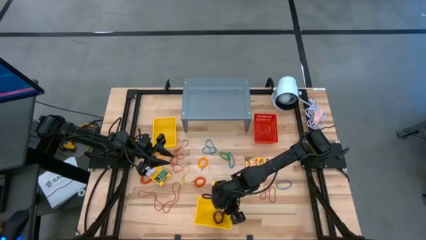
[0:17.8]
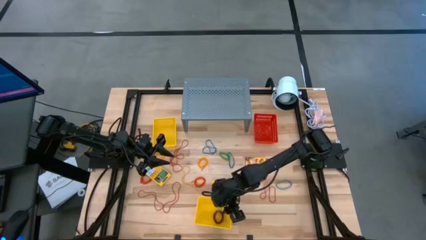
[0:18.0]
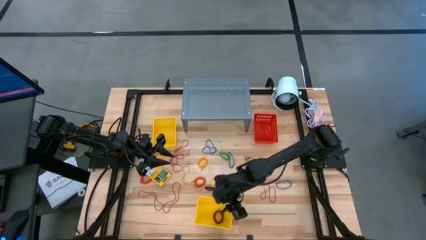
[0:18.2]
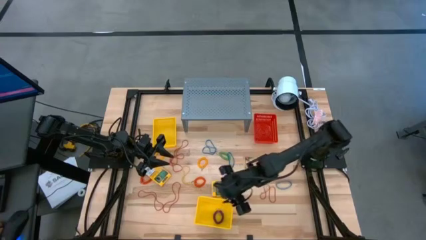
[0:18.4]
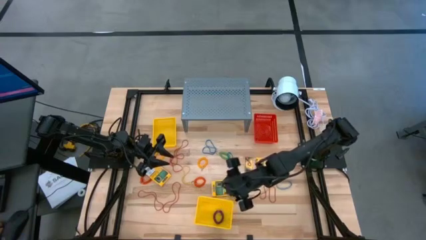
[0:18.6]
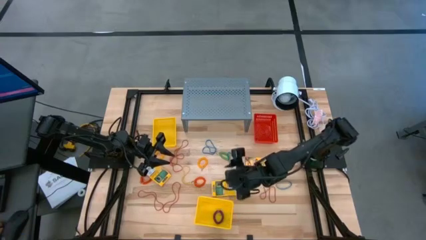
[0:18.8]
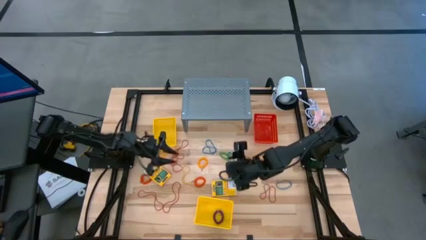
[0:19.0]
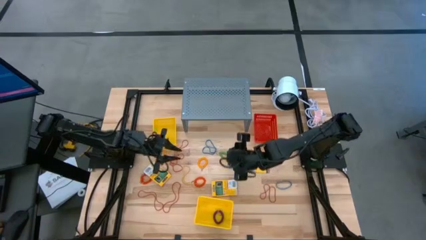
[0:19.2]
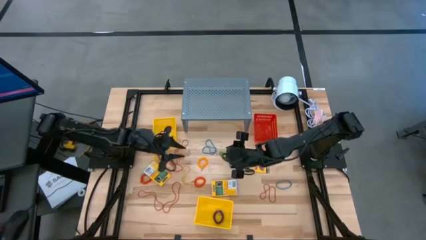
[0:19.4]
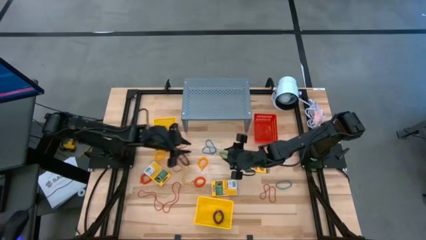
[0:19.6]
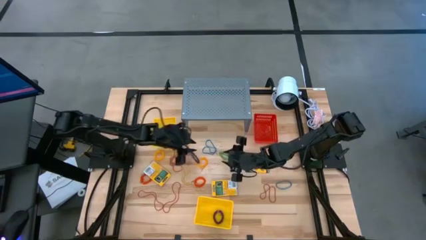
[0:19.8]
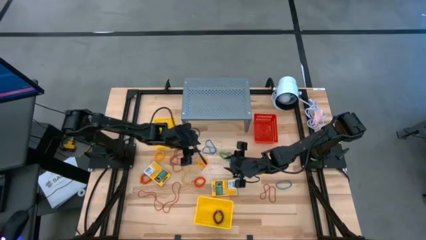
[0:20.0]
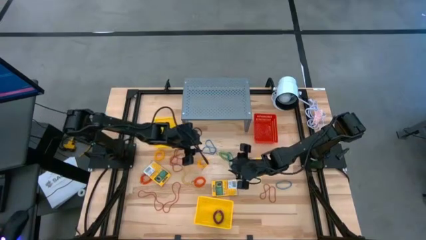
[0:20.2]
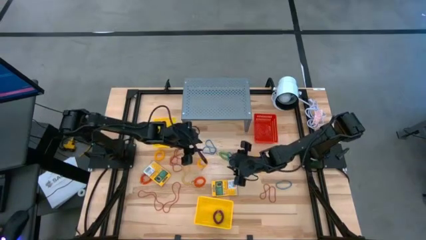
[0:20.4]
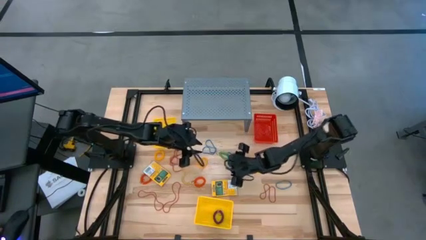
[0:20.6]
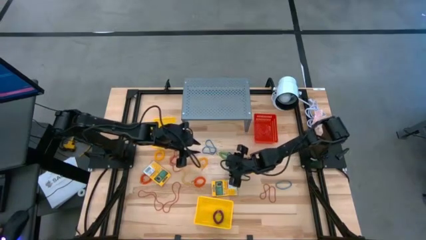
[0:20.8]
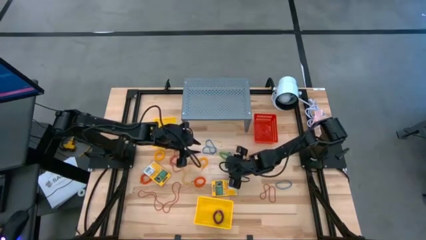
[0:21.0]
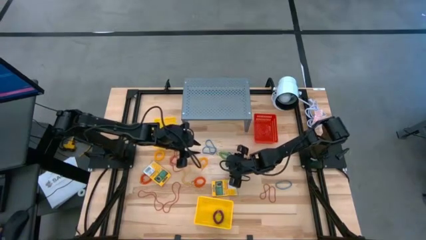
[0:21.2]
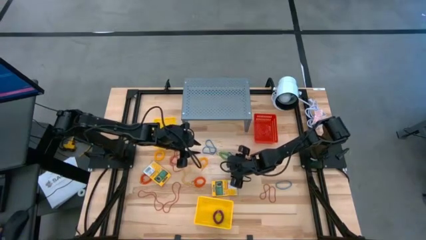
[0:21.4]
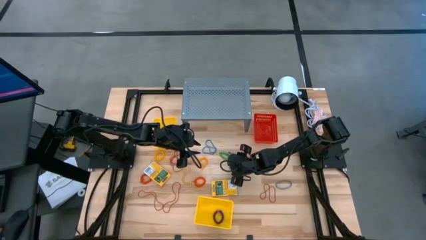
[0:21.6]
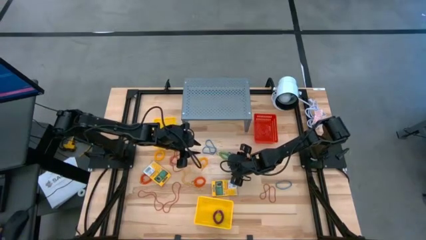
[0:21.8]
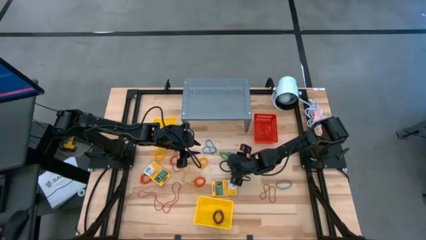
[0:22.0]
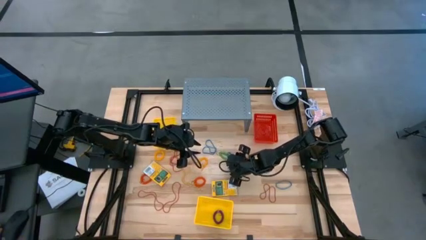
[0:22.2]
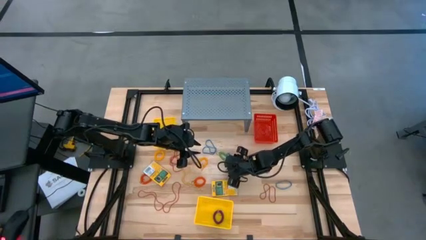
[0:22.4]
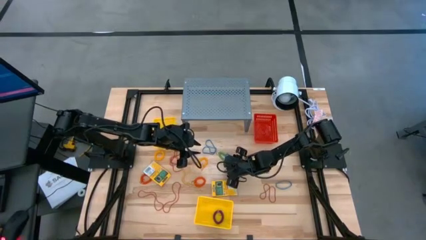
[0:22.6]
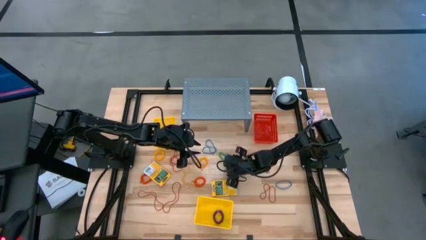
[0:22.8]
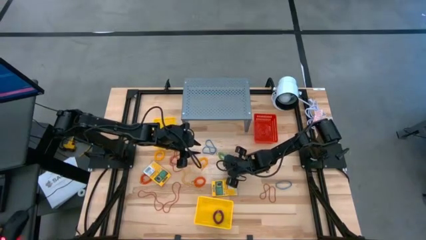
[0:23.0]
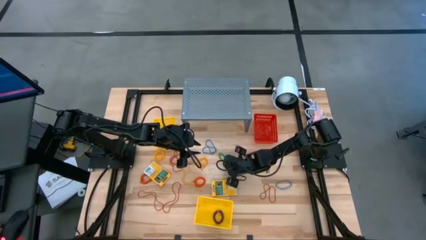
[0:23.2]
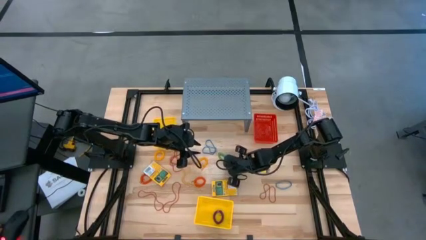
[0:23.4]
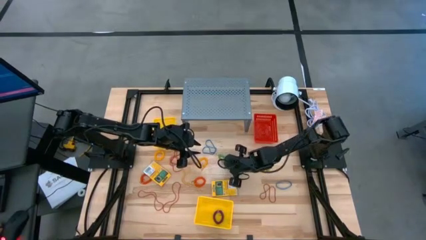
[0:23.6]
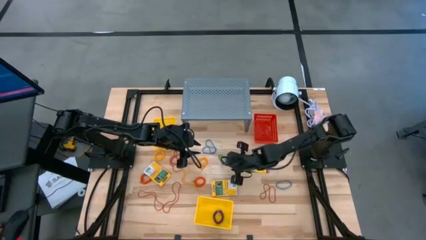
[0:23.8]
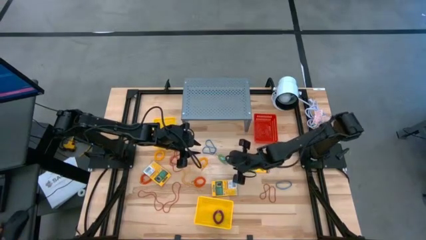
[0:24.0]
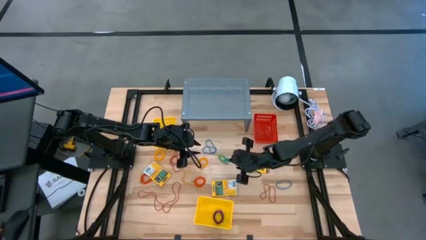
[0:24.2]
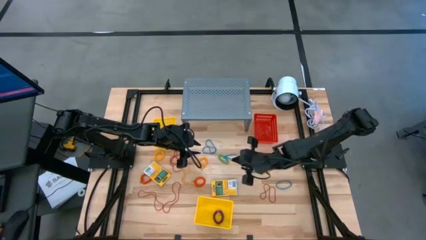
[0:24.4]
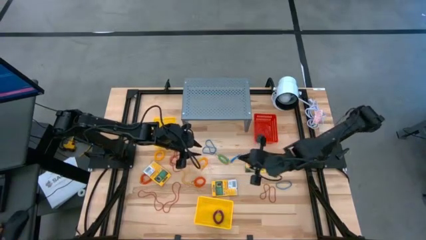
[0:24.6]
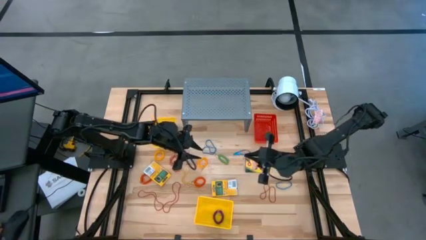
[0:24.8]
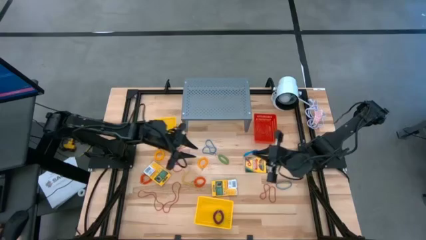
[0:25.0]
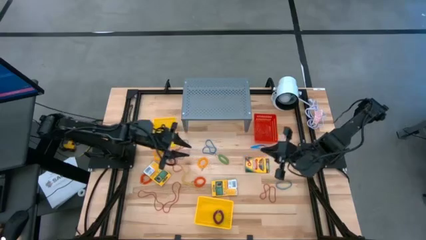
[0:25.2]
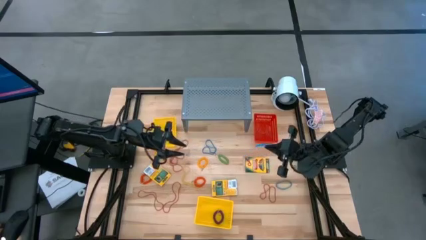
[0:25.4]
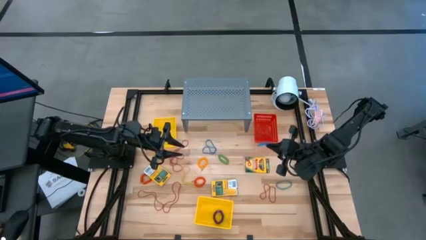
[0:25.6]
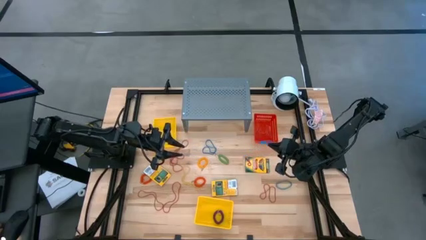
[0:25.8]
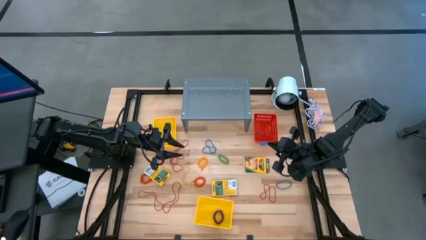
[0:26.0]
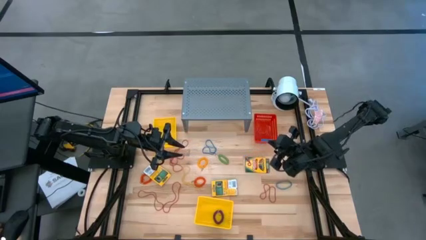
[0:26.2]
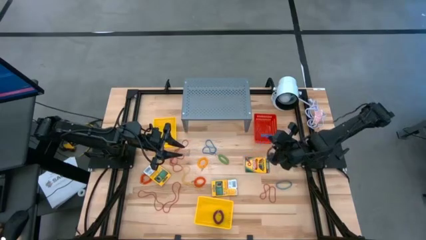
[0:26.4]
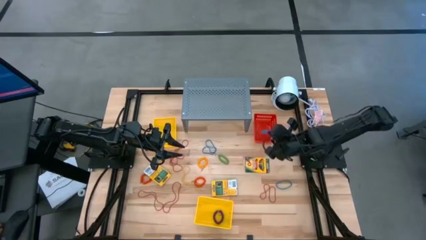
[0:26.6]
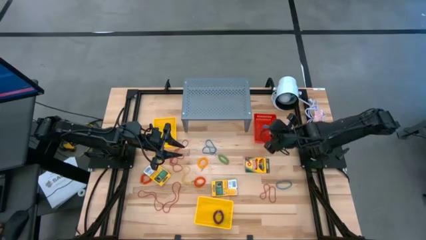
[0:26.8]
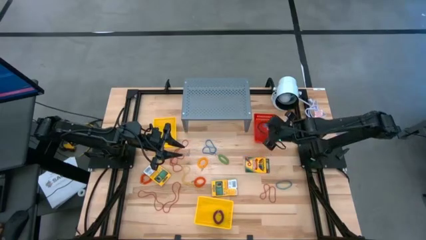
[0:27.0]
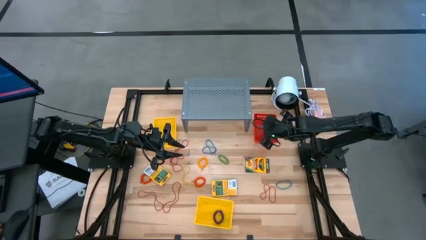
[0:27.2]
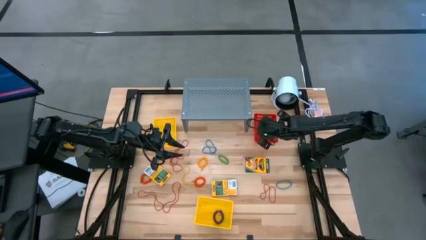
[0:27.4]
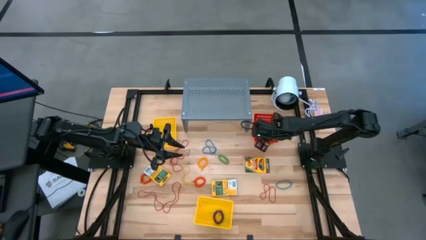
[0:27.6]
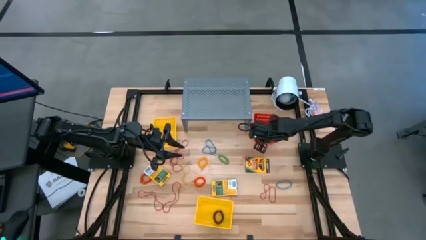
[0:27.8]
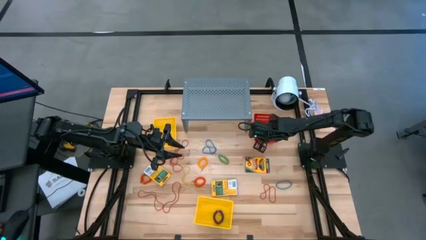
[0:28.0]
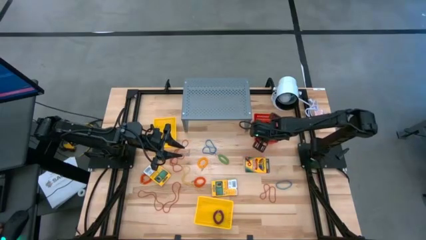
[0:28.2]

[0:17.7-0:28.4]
Task: Pick & Place Office Desk Supplies
Put the blue rubber band into the red bin
